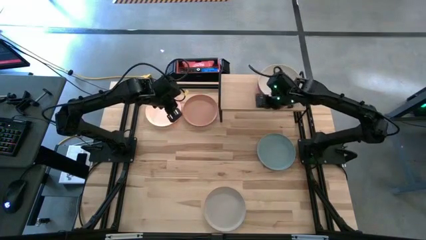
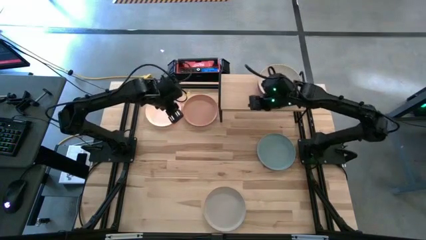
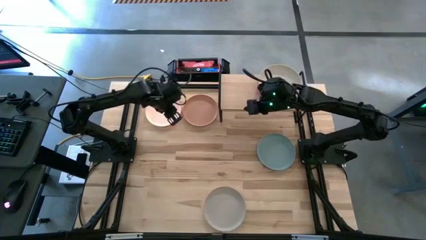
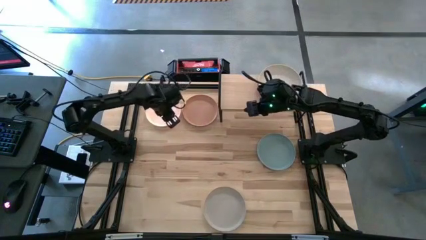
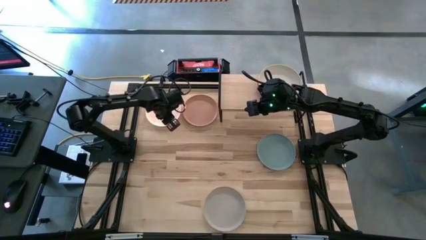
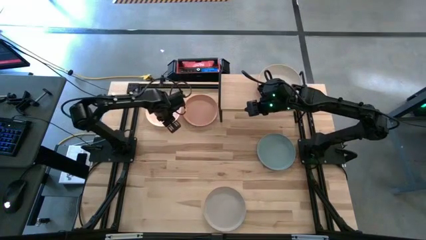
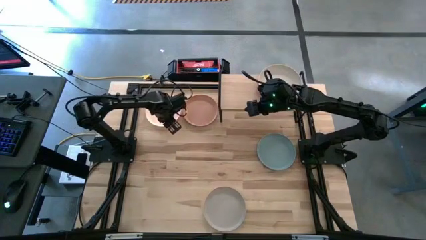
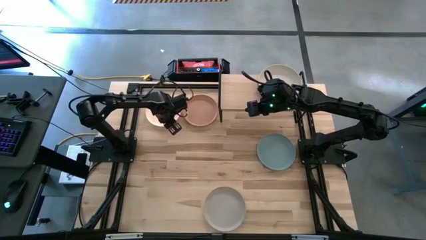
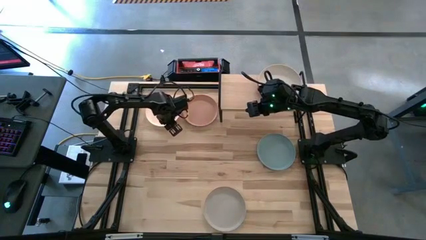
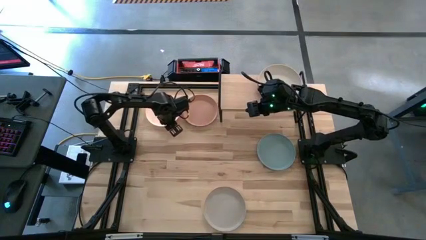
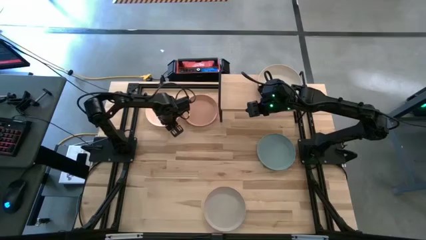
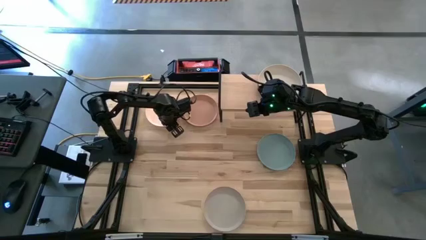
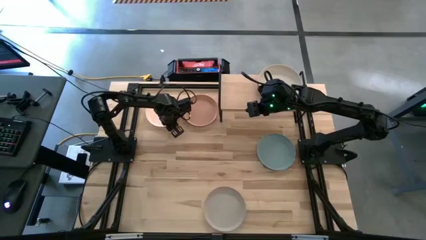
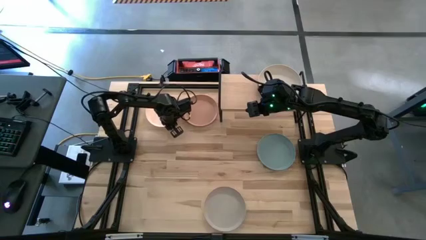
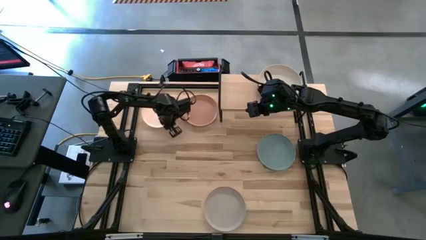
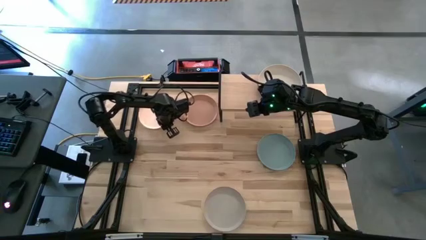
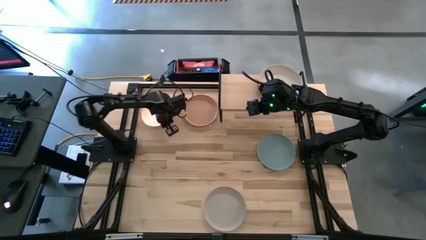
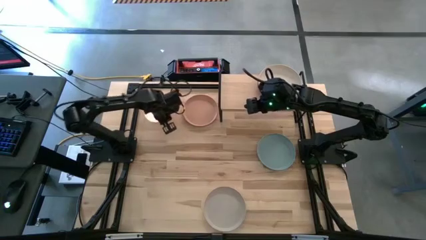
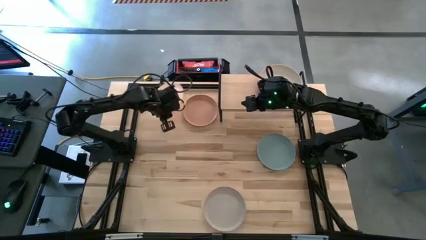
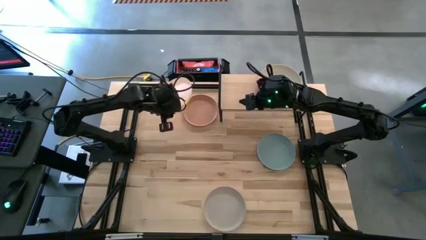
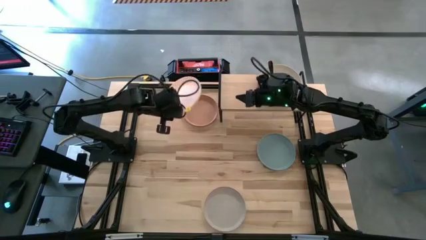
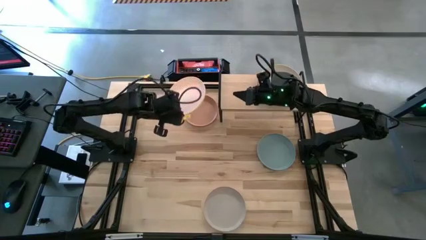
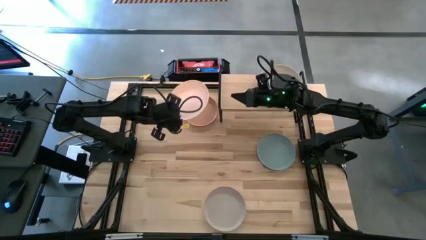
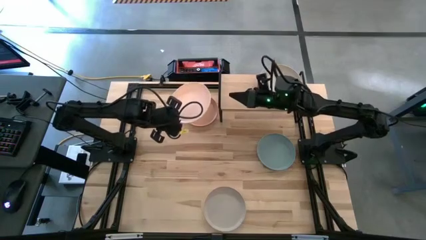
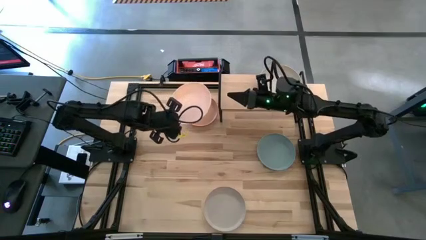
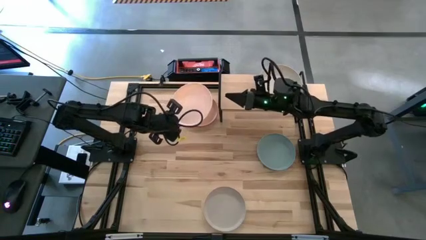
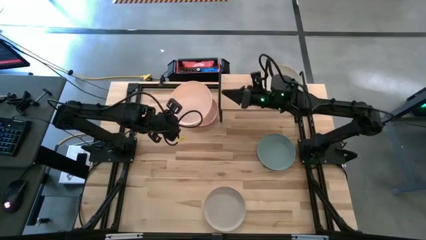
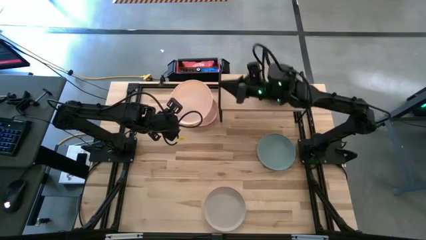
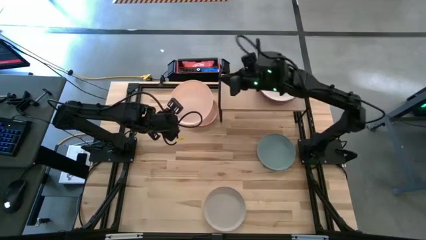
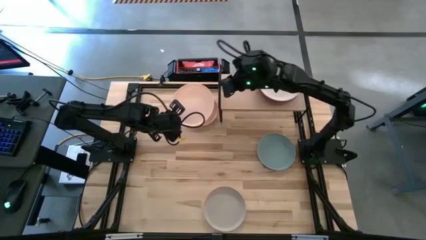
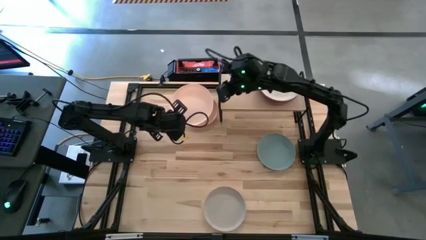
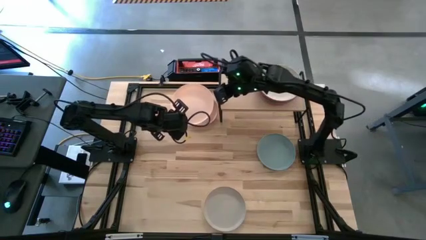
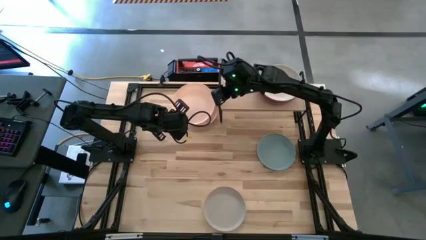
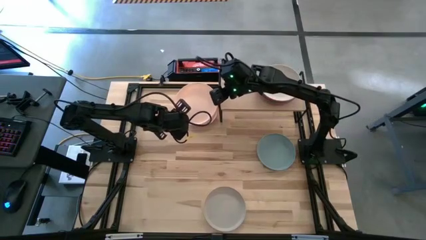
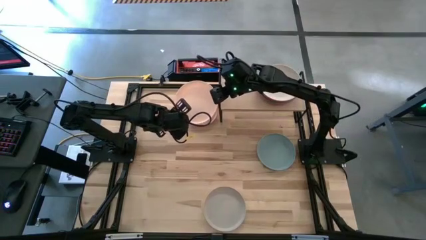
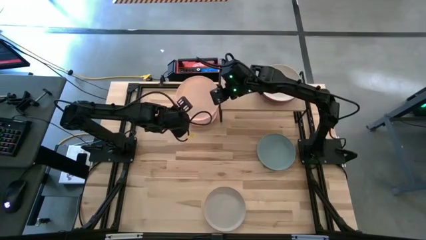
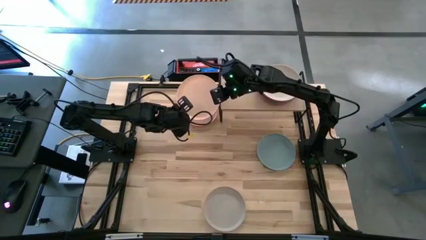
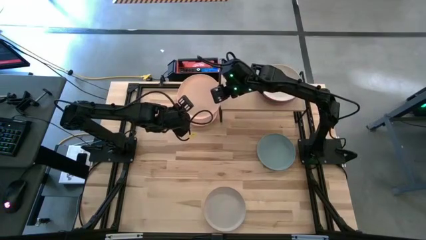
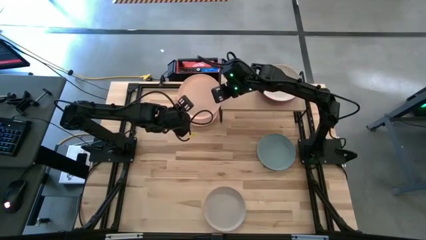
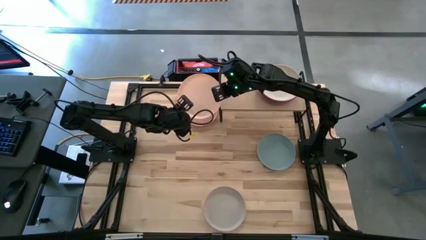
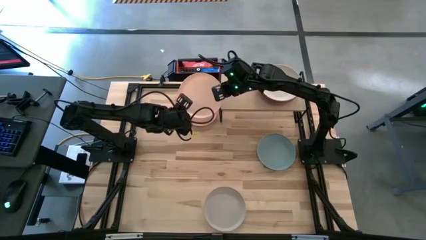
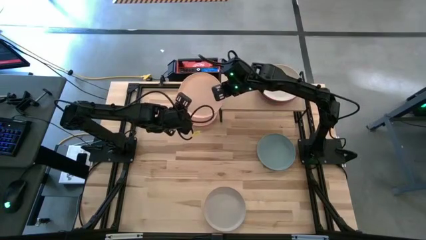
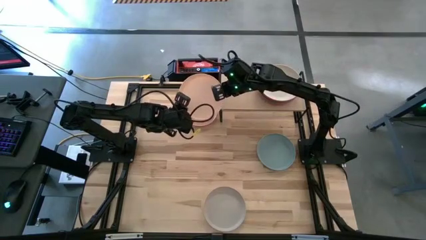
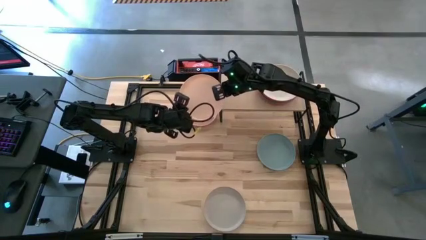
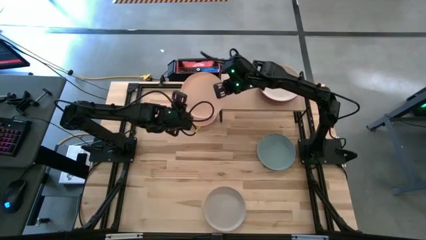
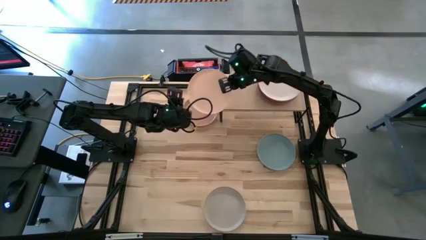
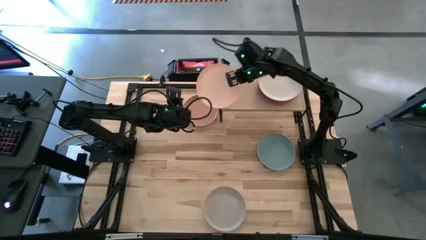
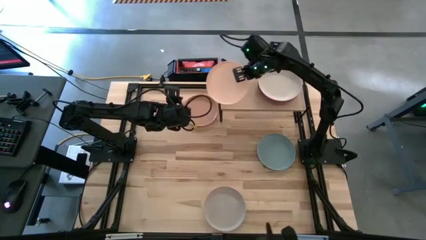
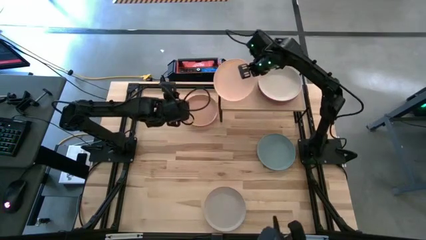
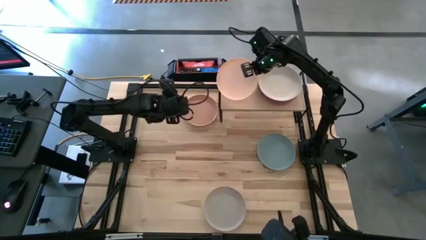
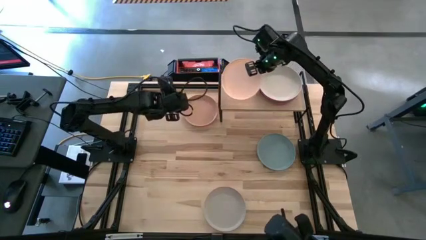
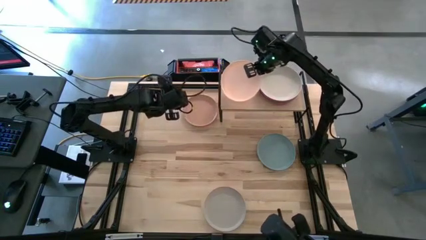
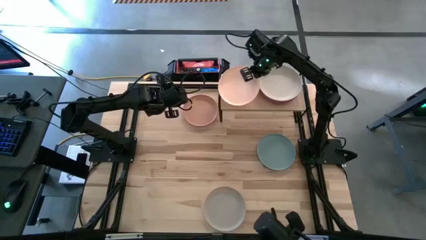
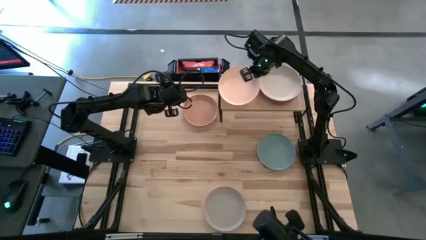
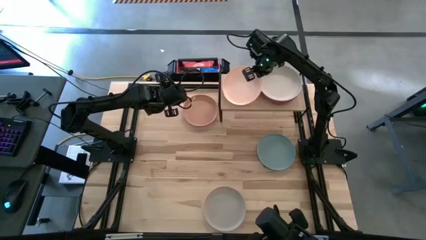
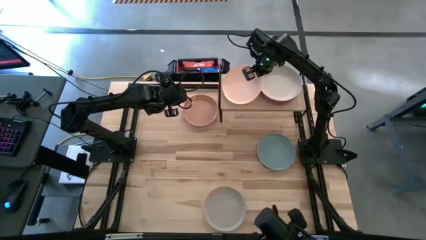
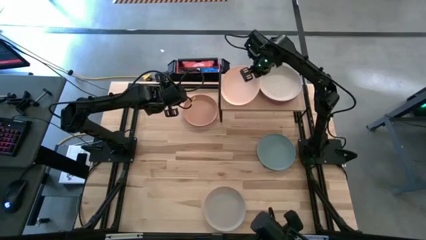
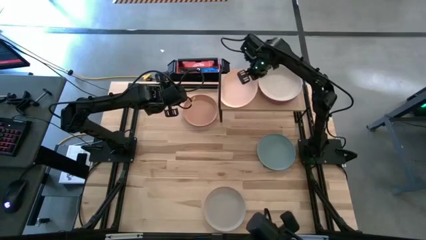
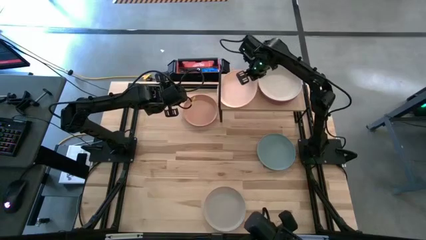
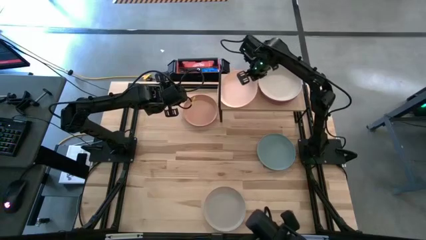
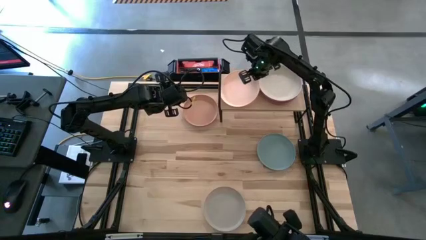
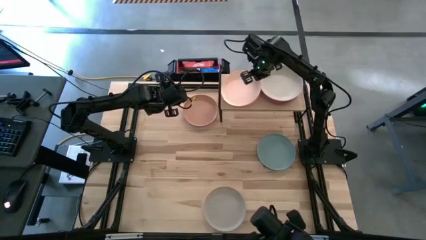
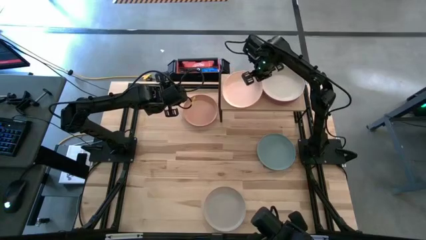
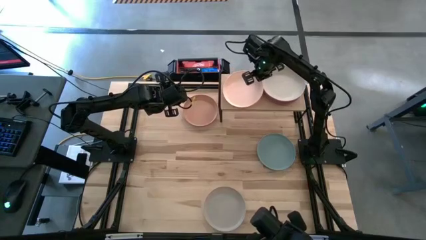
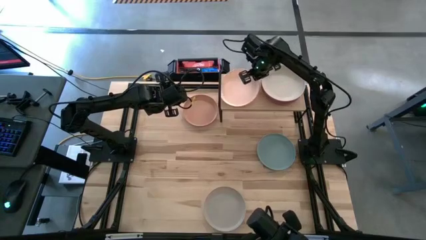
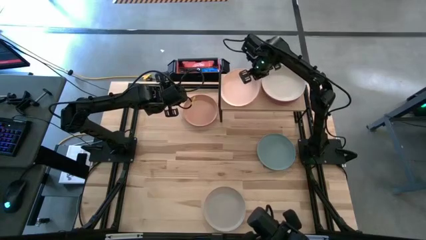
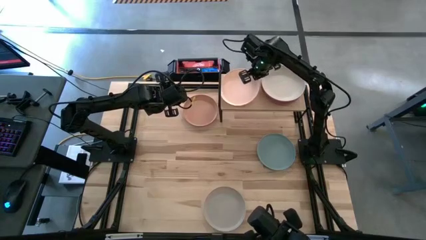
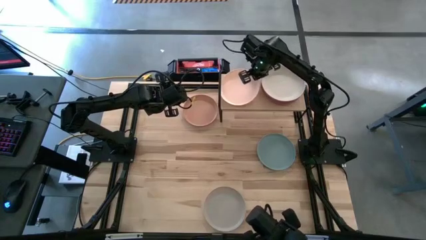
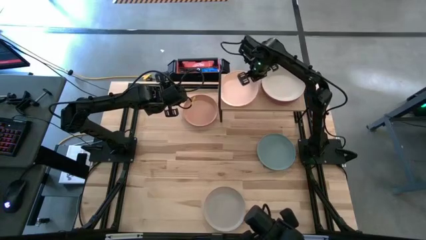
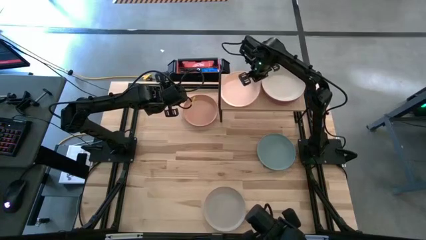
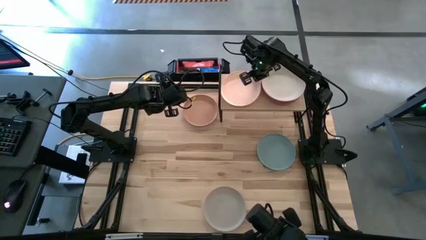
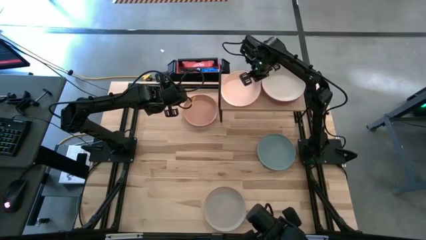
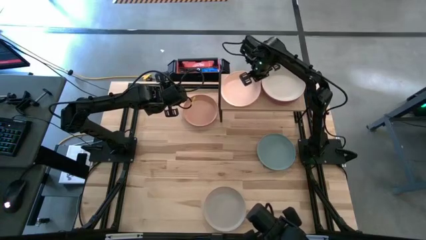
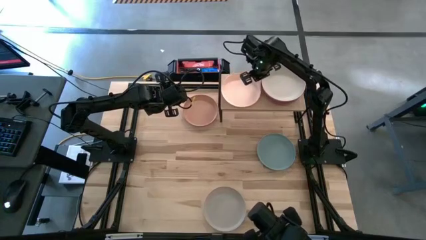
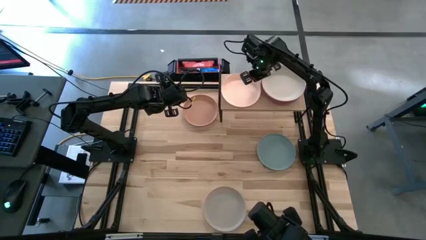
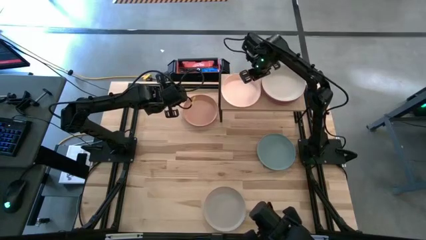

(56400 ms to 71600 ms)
Task: Place and stack plates onto a shelf
Put the light orange plate on the shelf
